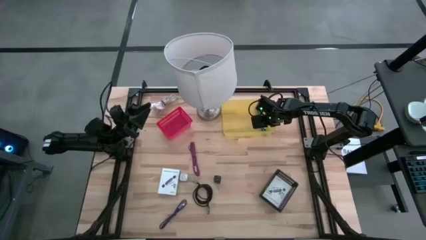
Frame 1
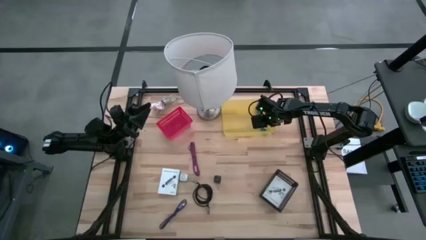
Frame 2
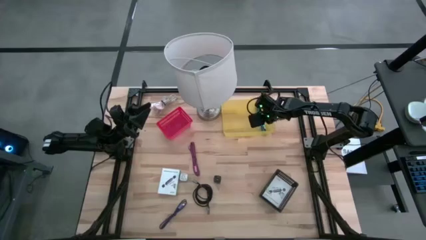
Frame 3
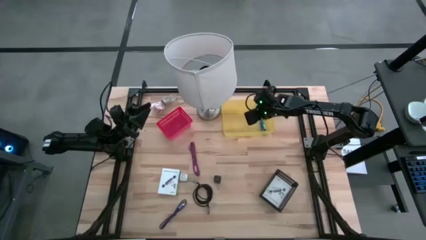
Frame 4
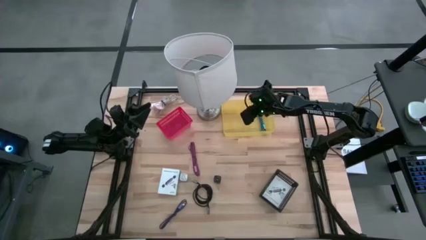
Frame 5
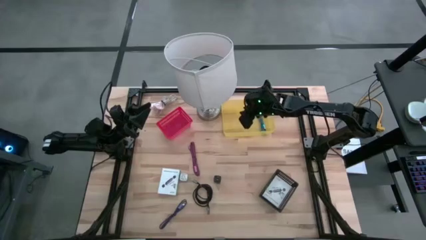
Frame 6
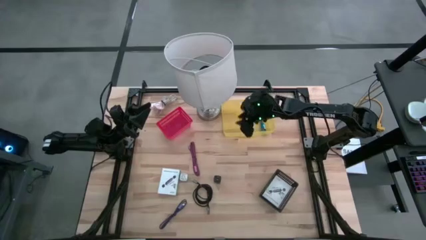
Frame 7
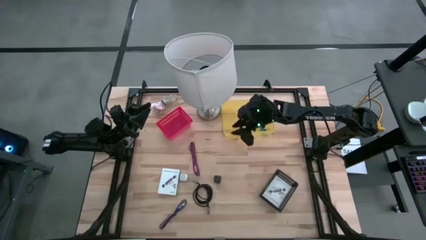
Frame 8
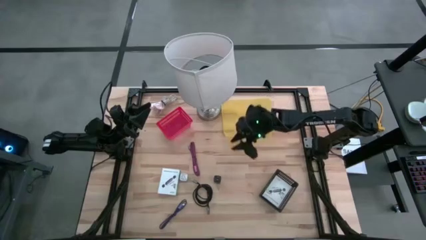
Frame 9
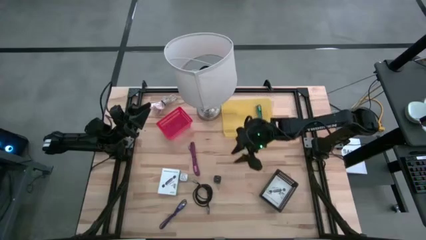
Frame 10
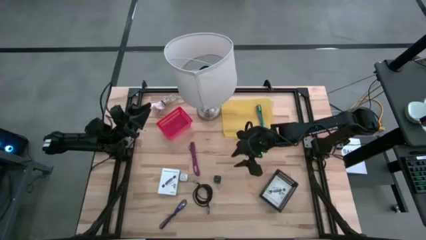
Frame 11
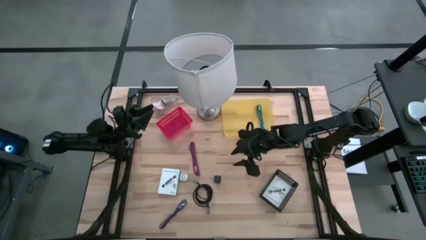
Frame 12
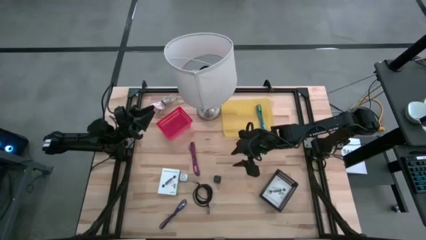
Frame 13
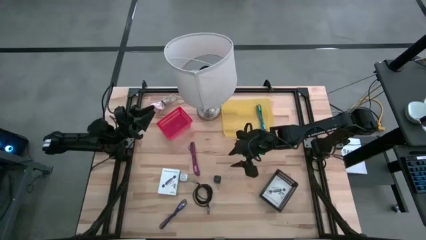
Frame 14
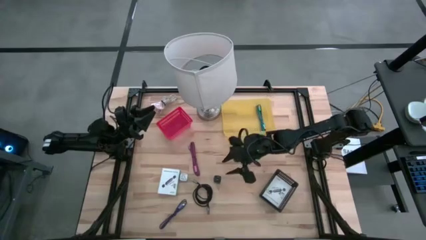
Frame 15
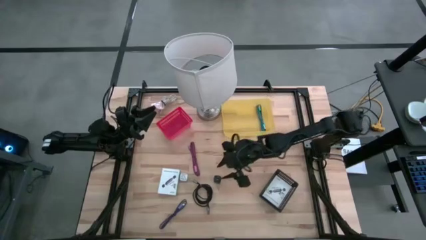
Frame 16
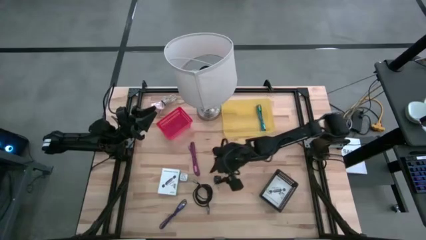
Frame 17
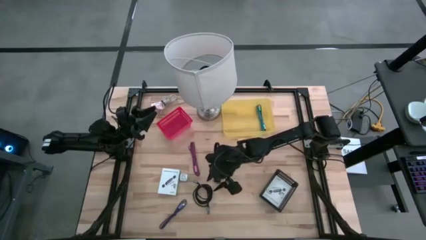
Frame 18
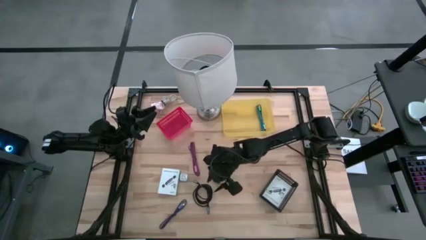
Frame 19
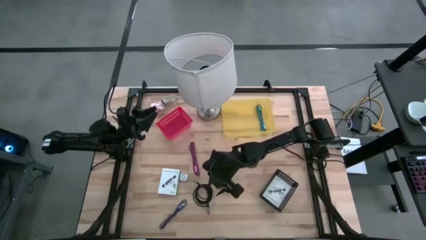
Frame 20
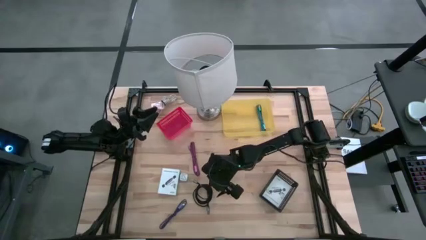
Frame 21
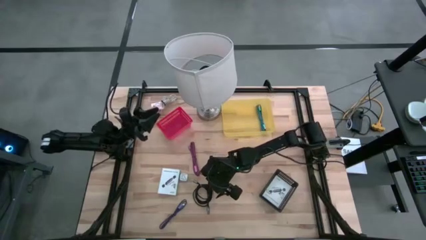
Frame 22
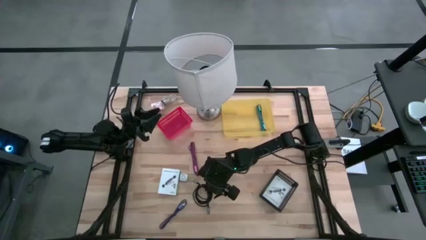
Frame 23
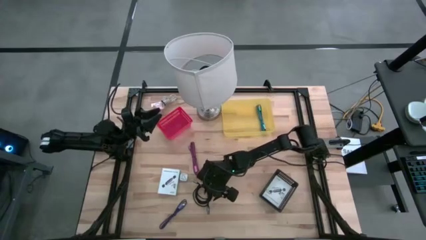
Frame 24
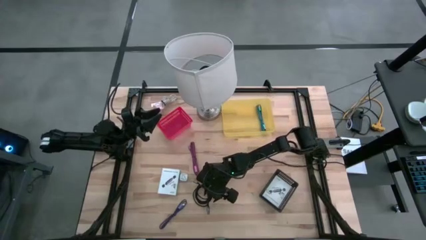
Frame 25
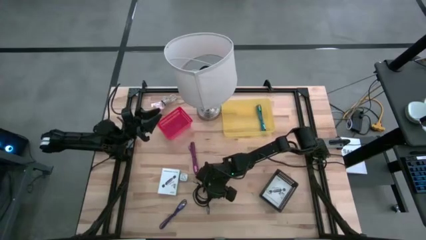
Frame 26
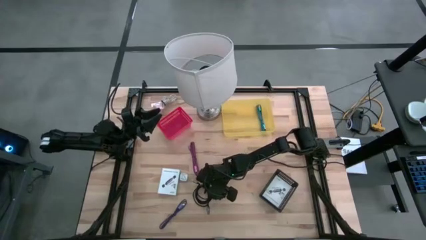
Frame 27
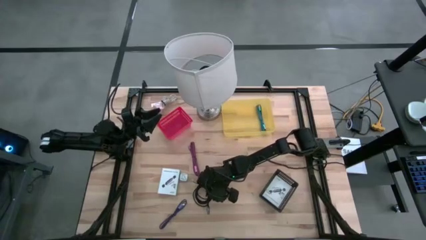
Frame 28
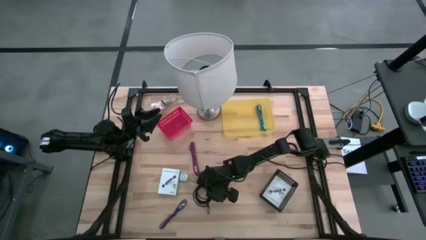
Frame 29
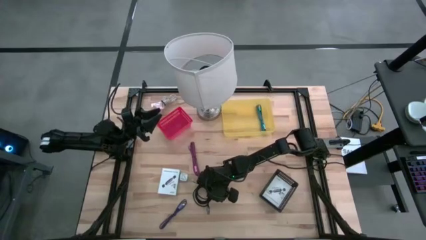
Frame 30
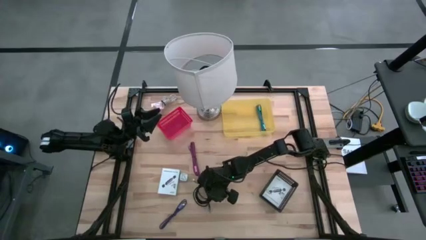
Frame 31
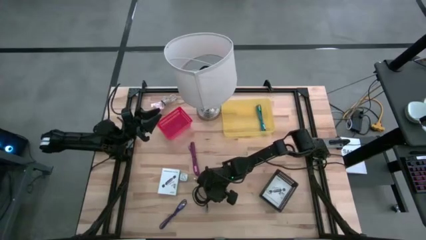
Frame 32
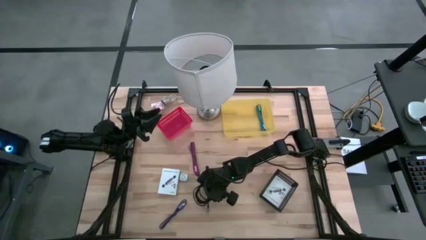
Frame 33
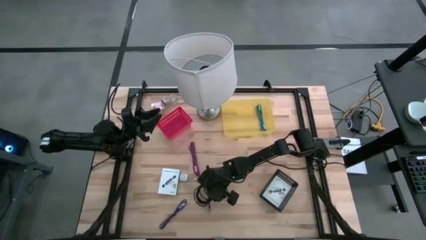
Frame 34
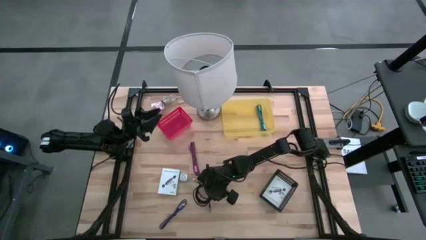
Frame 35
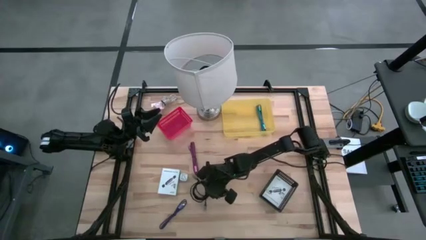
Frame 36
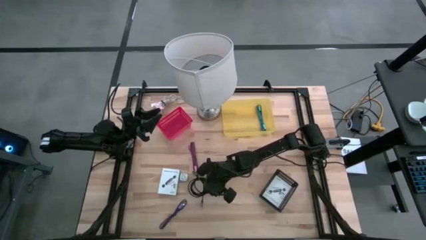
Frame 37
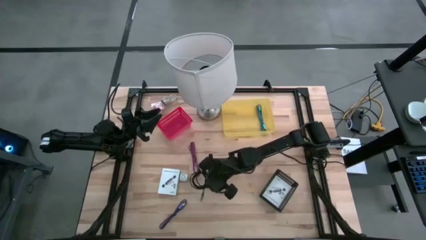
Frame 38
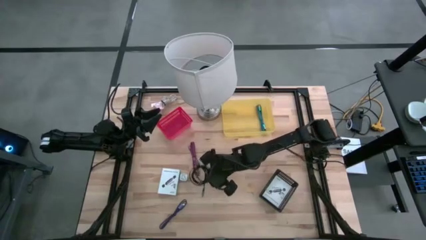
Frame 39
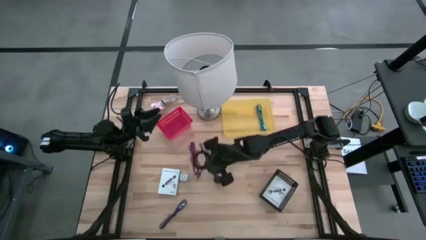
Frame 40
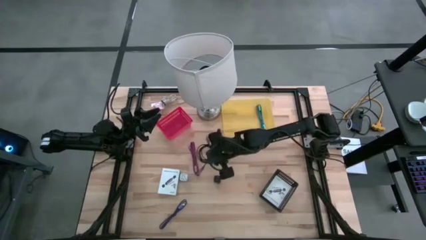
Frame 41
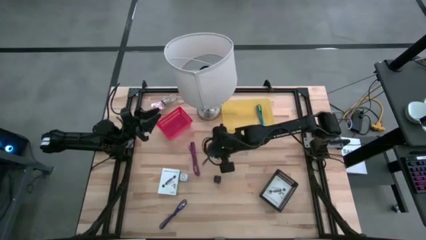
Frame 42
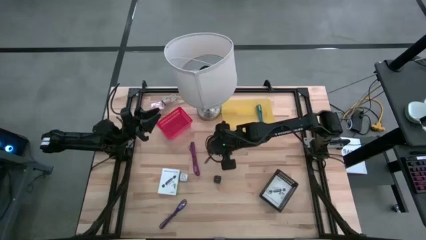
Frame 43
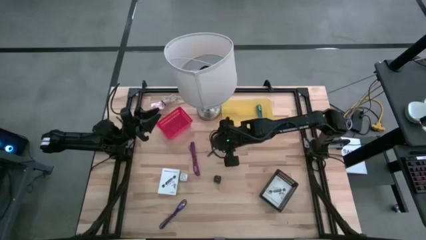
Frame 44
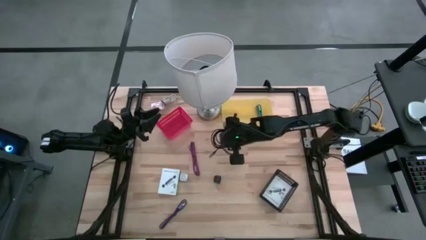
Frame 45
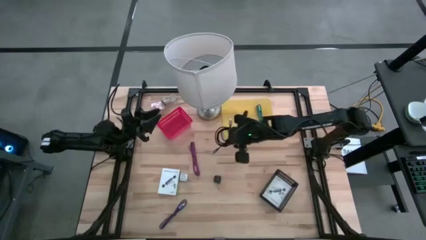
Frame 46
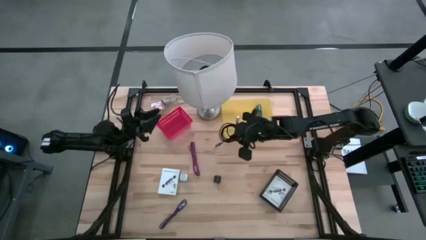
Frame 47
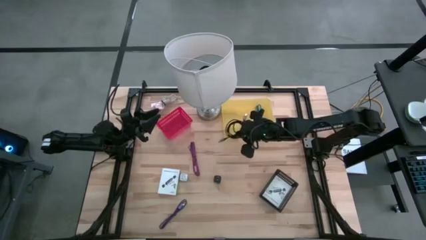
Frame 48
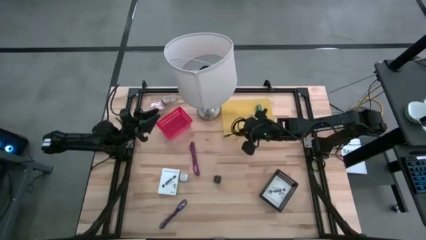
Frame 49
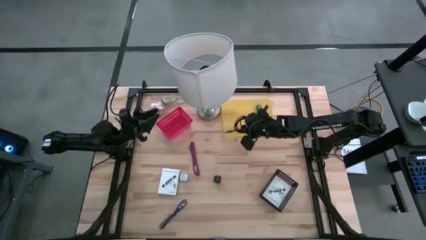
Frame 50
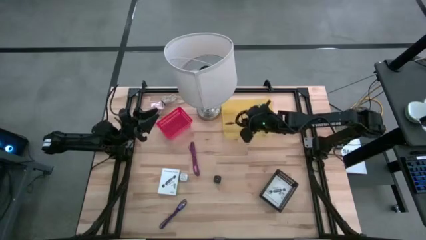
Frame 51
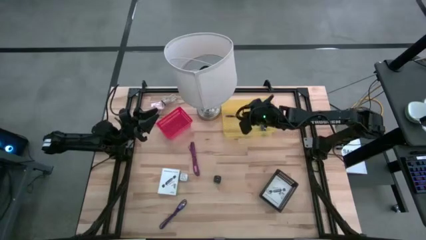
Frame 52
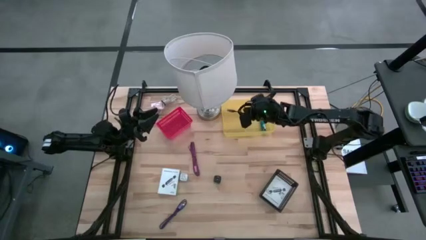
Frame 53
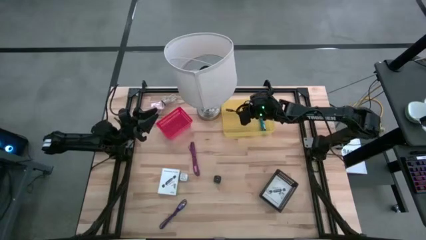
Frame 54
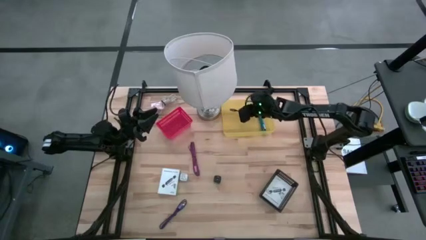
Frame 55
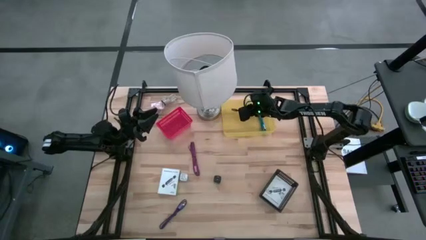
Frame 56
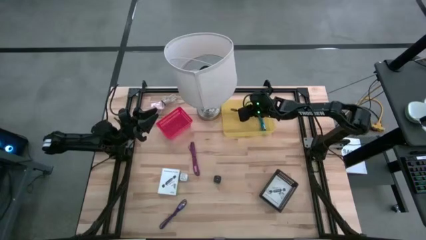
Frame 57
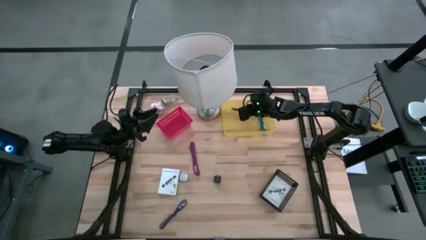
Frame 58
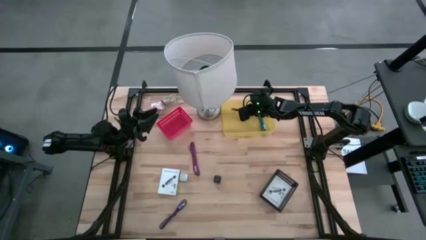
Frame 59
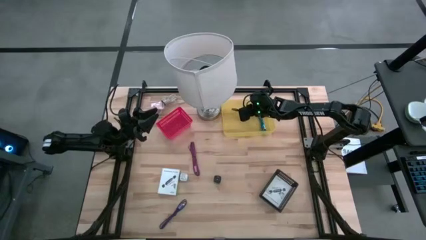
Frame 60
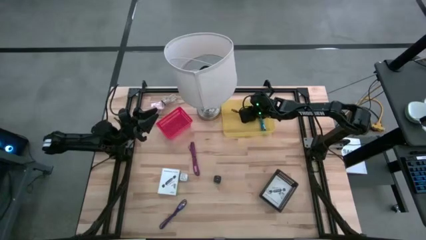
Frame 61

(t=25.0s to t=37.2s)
Task: Pick and place items into bin
Put the black charger cable into the yellow bin

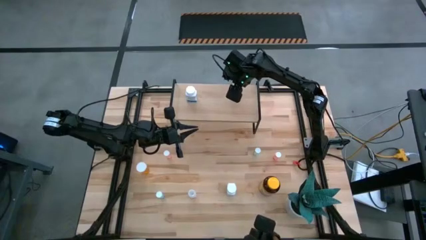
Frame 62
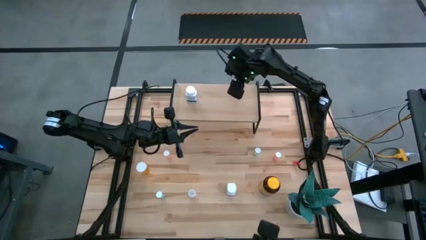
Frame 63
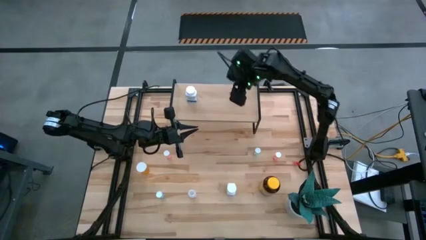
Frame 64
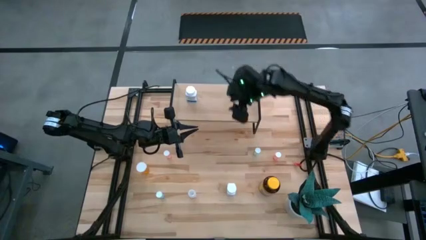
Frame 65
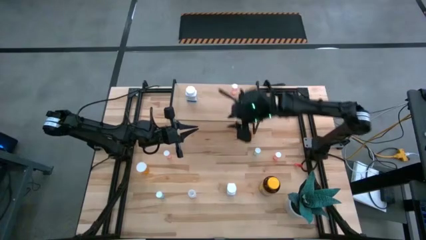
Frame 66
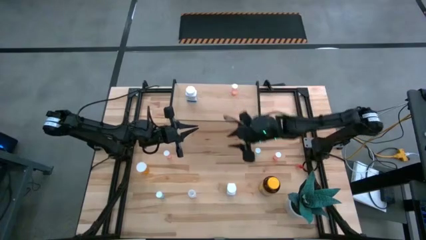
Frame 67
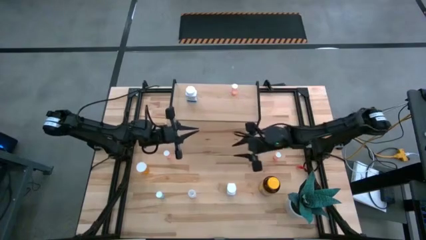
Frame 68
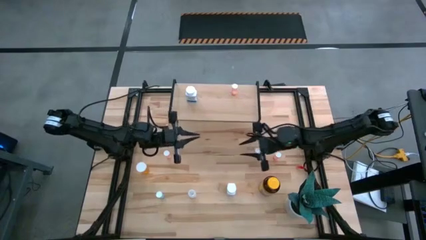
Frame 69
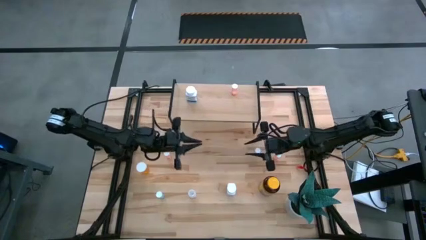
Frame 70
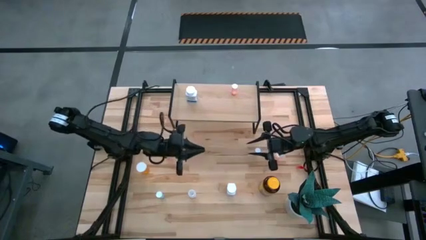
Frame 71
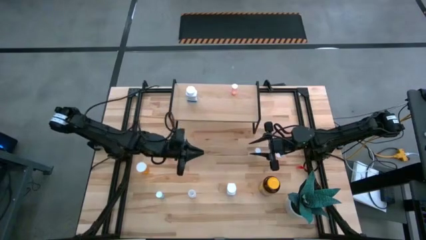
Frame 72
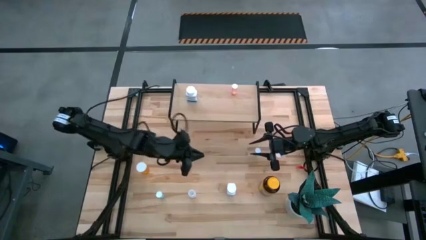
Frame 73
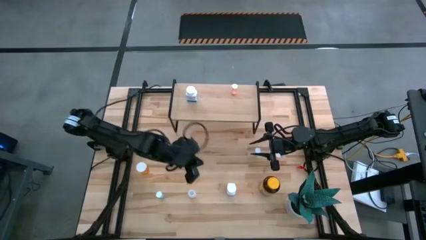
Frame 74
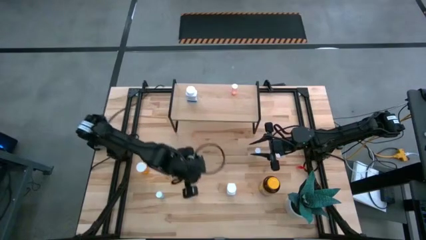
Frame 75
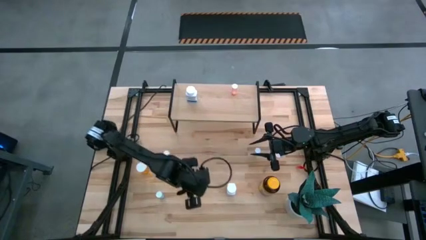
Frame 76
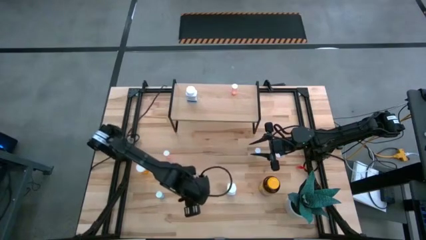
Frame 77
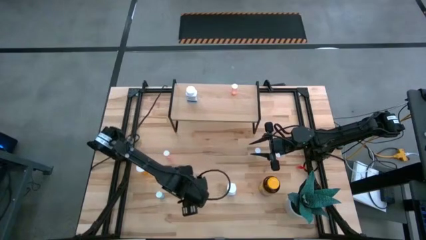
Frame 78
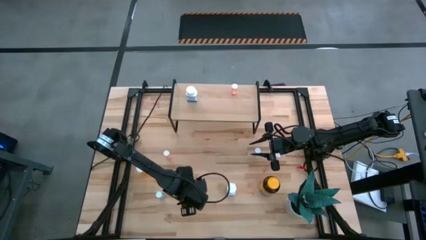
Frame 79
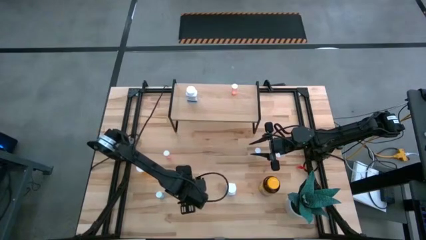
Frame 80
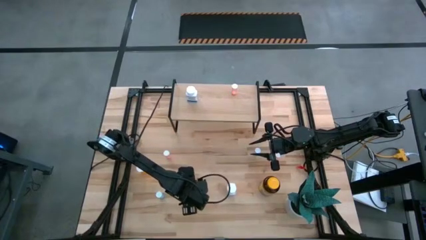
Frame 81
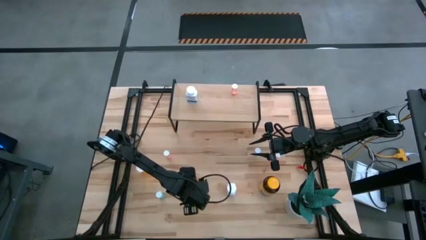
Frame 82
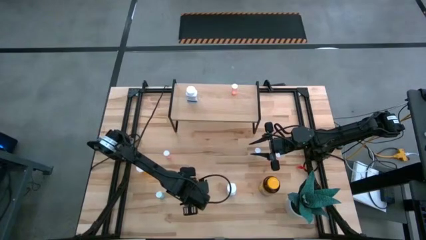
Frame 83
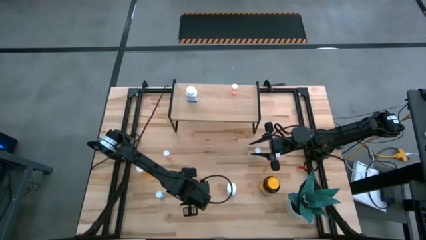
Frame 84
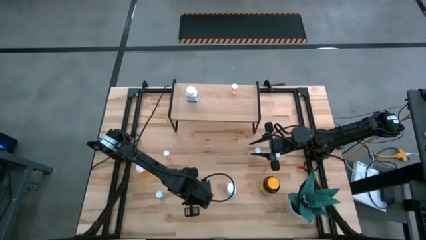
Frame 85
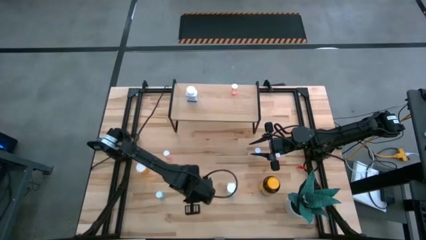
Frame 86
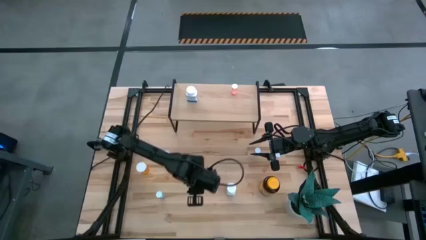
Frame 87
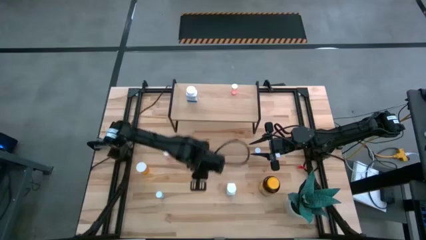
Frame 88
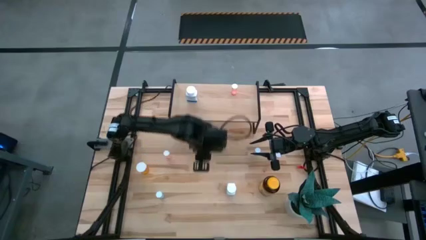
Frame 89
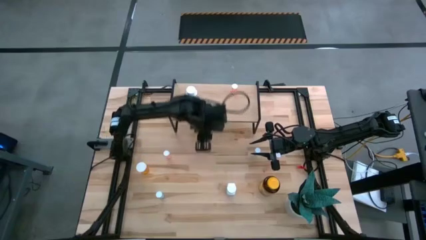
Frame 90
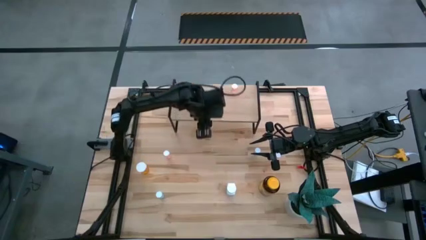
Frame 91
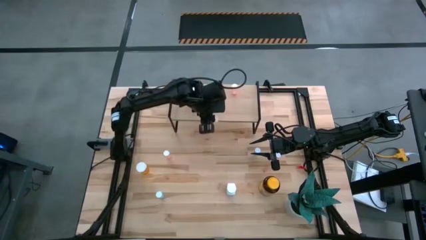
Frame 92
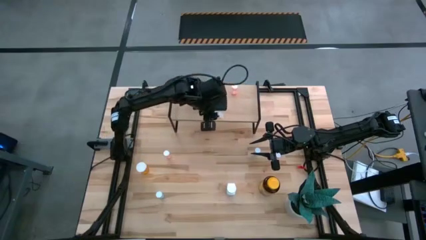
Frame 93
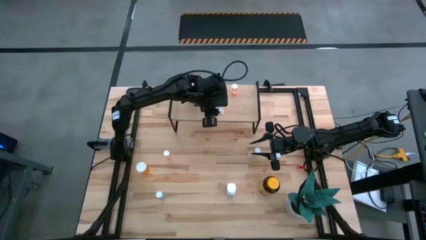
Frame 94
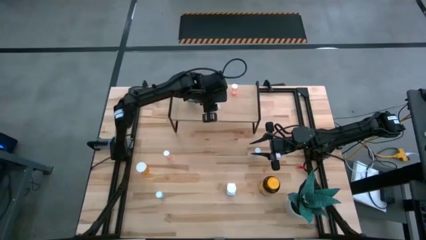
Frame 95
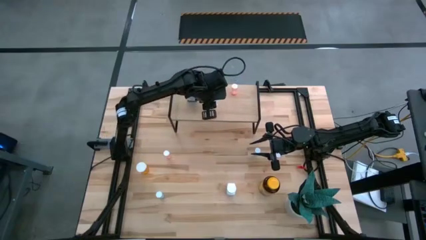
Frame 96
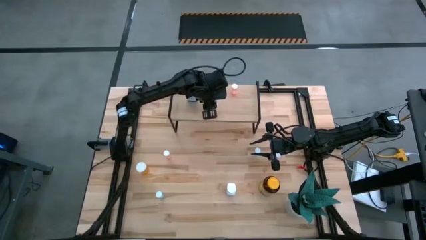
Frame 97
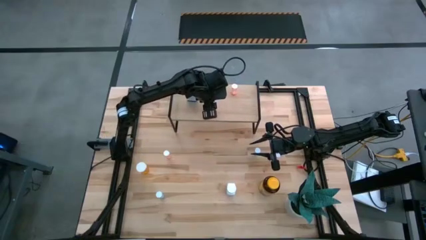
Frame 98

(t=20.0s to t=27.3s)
Task: Pick and place medicine bottles onto shelf by color
Put the white pill bottle on the shelf
